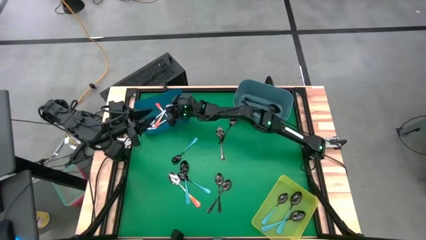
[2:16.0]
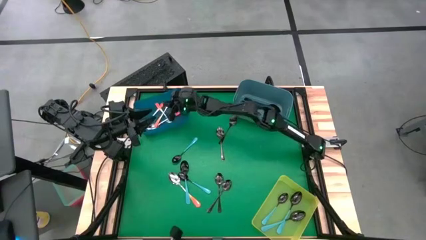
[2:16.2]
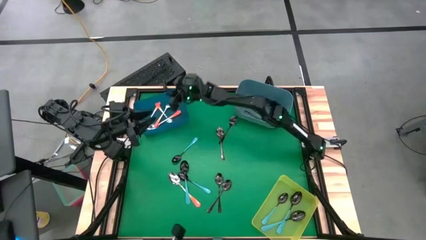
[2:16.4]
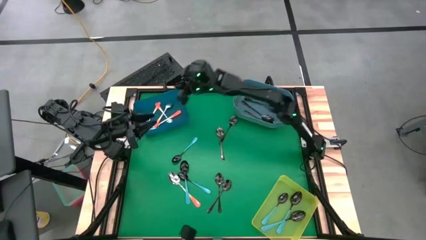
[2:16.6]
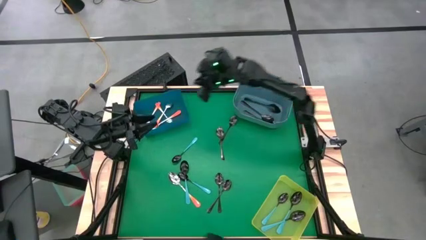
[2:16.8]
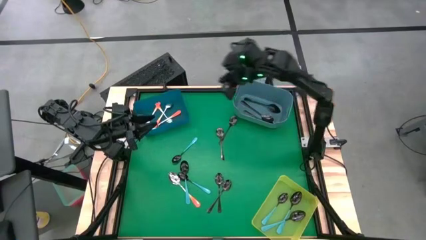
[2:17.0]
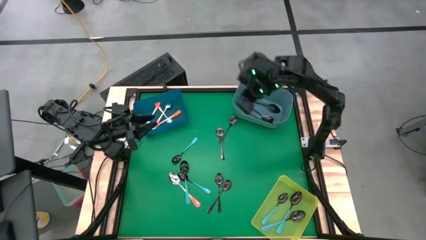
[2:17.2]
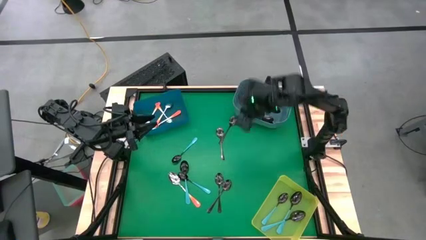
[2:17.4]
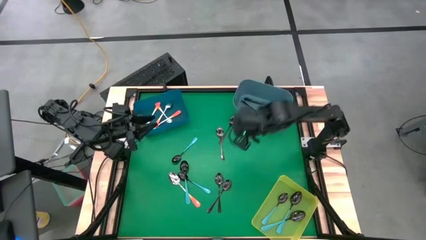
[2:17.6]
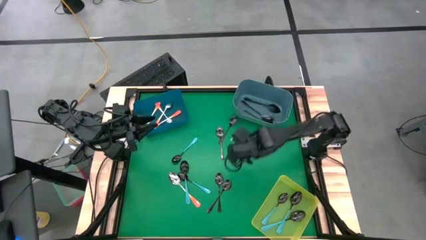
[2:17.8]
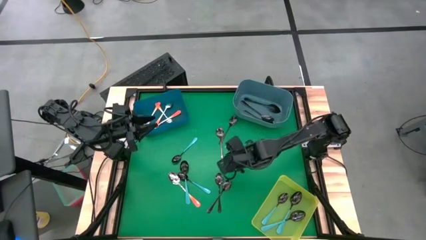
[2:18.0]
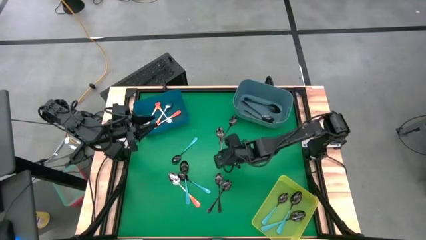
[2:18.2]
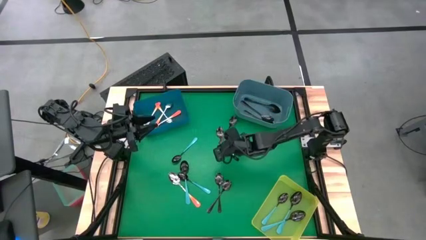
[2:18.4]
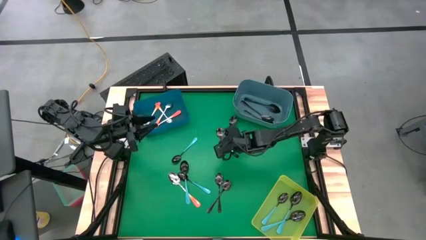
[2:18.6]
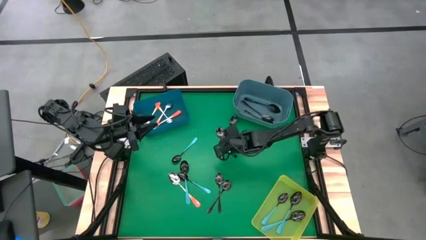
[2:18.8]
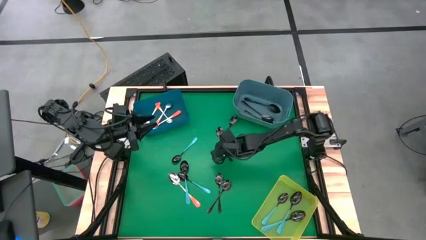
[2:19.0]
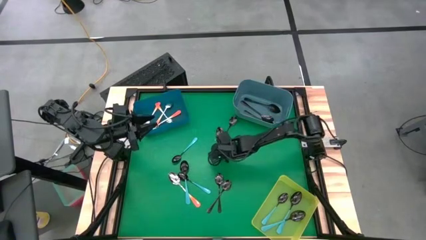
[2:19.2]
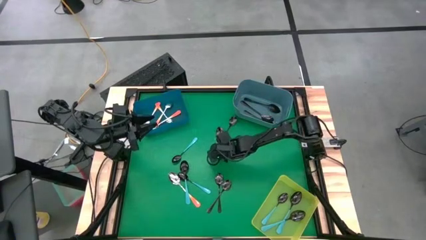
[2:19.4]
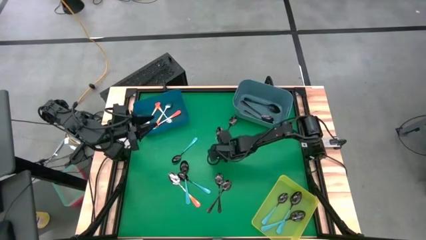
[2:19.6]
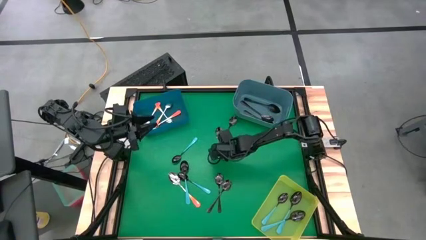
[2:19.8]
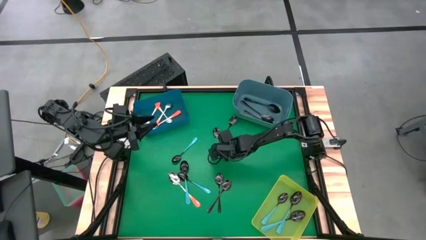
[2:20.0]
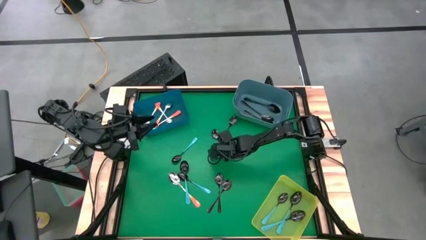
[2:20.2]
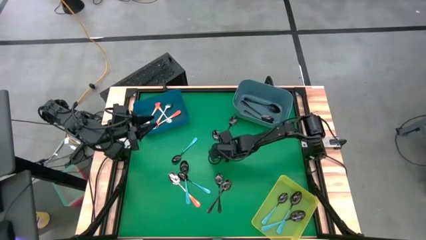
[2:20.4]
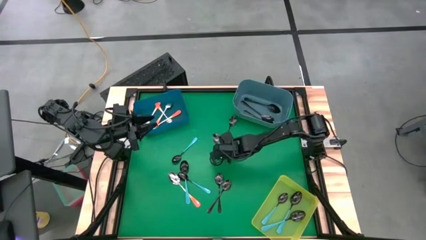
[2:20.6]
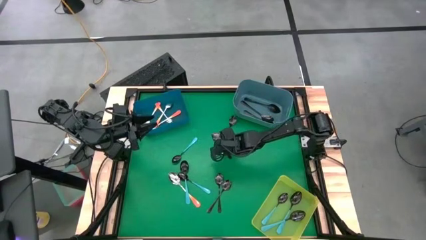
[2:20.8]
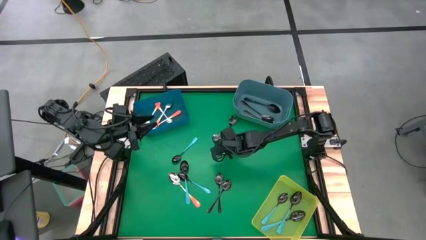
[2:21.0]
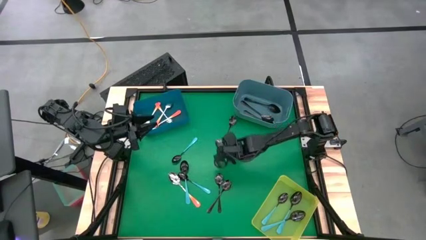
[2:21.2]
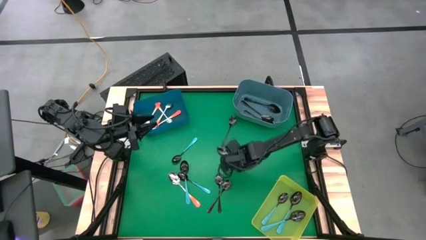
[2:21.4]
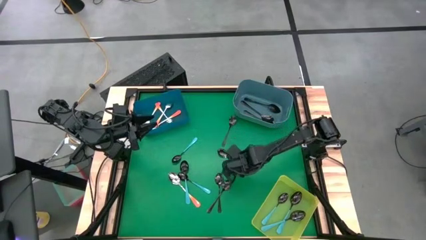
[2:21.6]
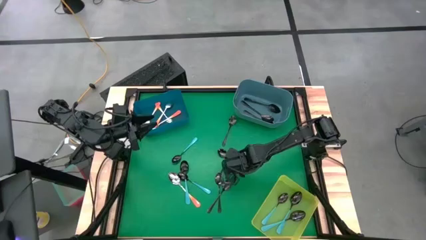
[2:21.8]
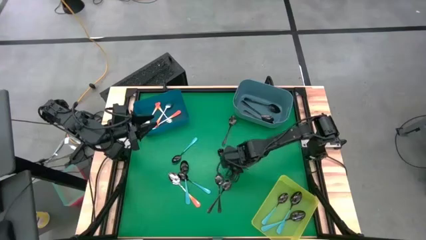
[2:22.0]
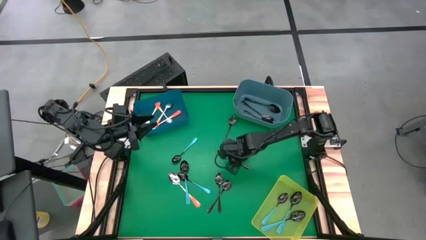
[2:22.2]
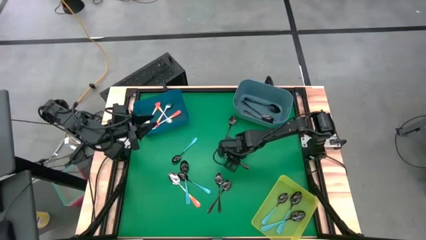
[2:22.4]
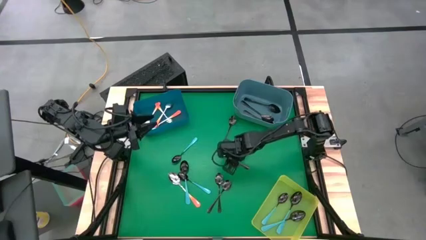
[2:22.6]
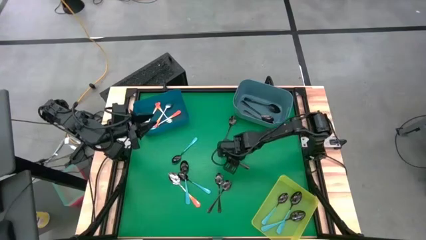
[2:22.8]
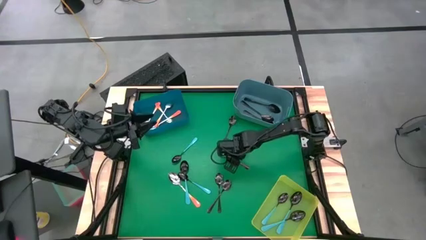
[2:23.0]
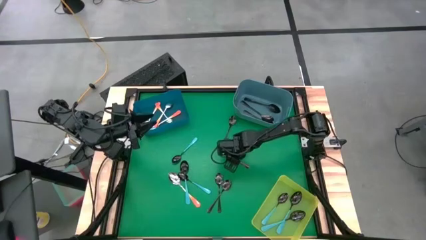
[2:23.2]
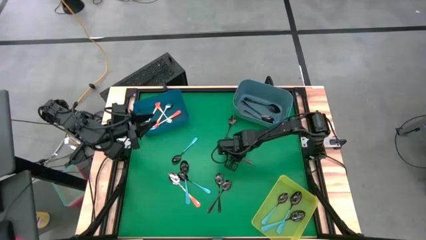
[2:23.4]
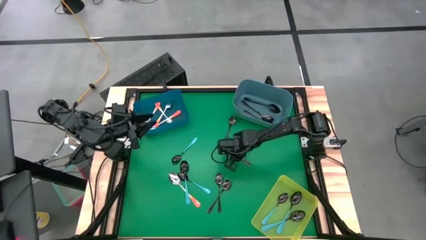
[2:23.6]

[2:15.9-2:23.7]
Task: Sort silverware by color (type)
Put the black spoon into the blue bin

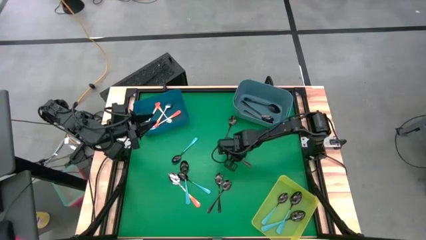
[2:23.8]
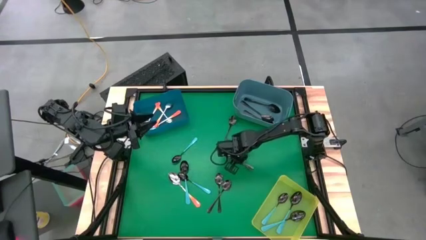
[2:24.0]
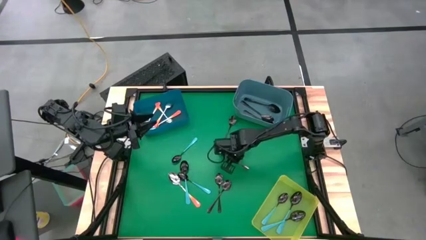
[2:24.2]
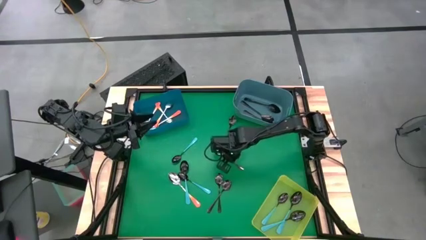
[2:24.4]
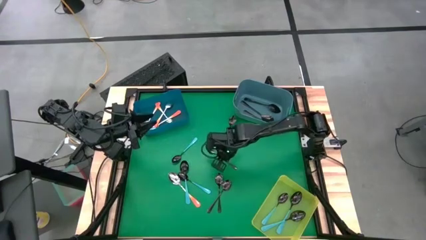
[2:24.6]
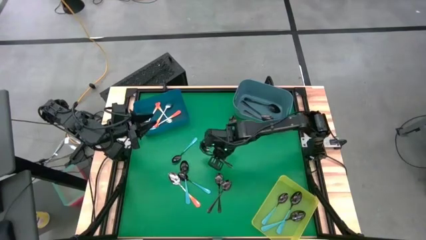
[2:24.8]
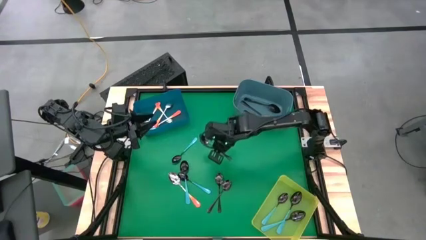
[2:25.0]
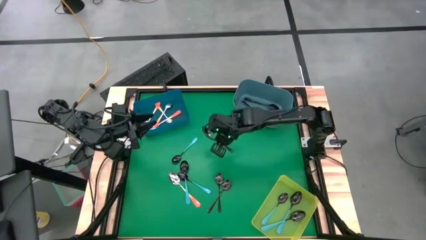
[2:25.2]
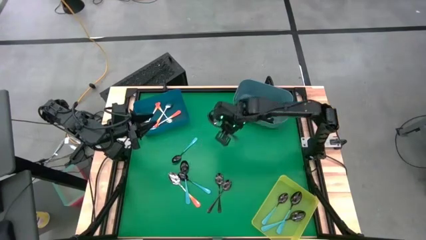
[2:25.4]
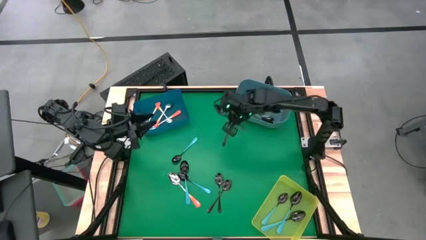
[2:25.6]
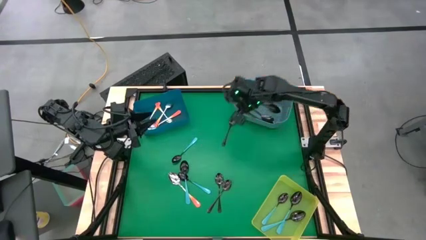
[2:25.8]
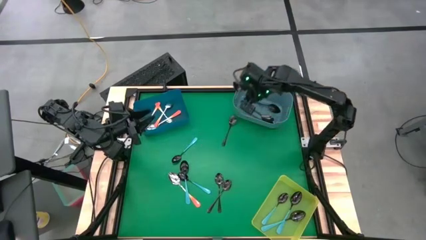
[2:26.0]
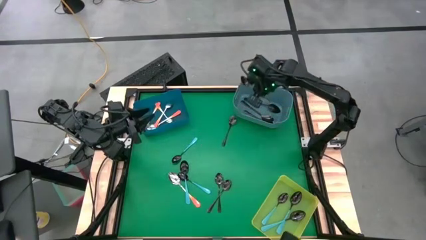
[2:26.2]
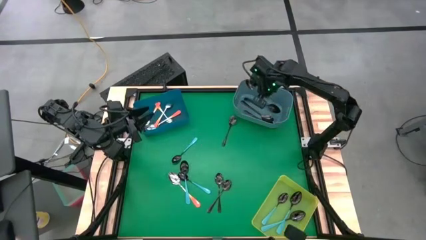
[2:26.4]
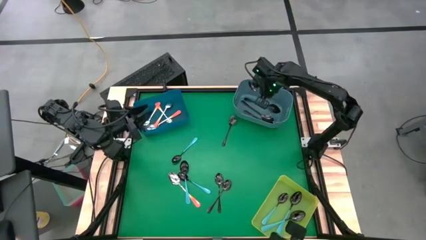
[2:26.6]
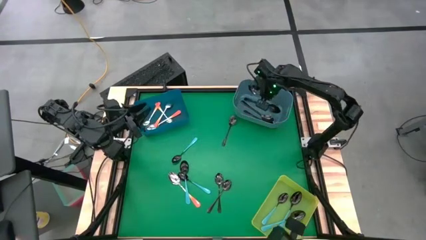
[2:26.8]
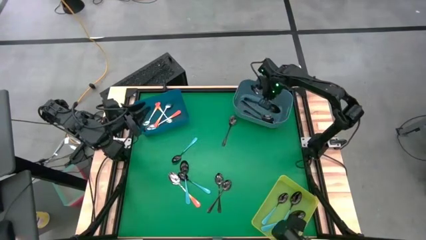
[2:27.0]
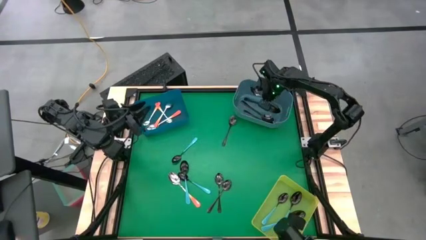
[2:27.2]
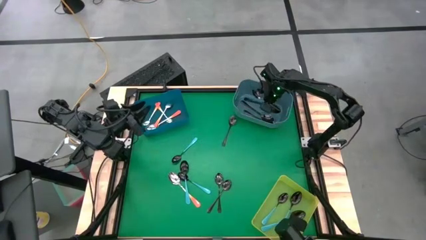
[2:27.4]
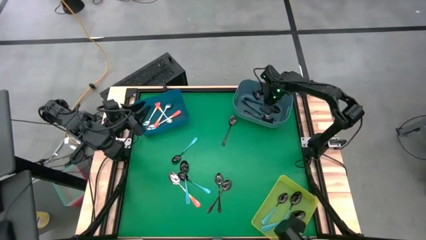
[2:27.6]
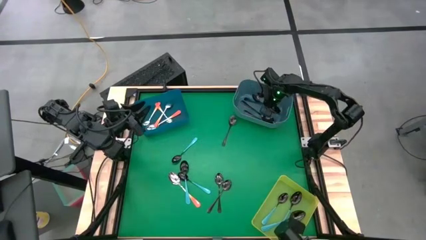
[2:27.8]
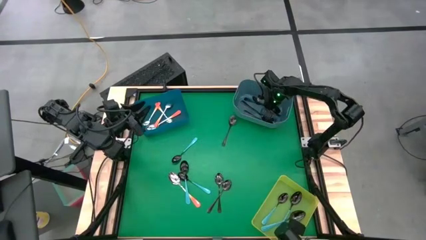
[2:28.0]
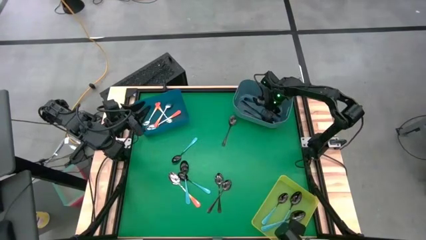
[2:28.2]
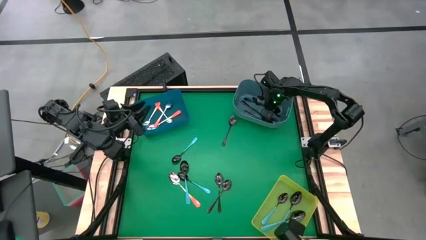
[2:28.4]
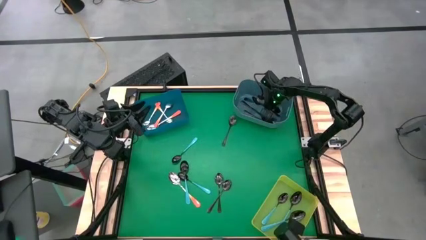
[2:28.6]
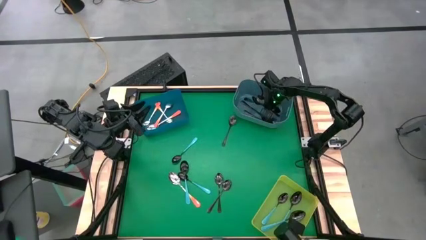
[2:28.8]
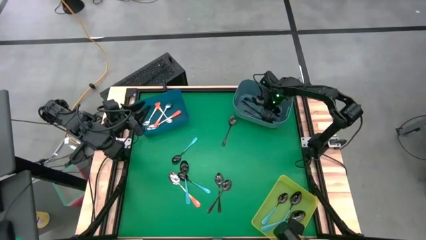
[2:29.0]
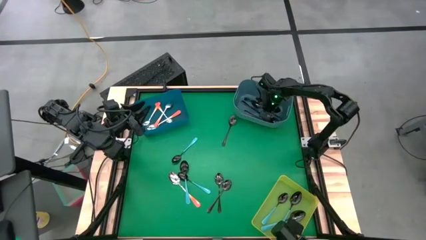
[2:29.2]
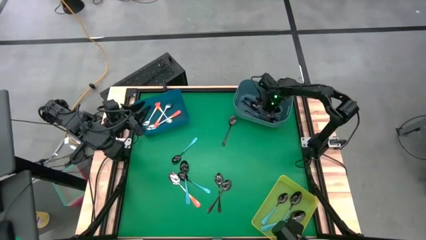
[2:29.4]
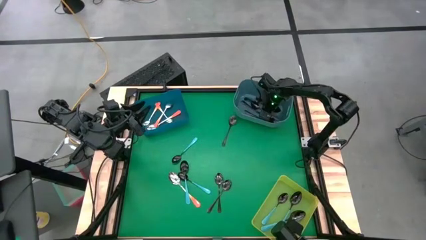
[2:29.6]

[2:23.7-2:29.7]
Put the black spoon into the blue bin
